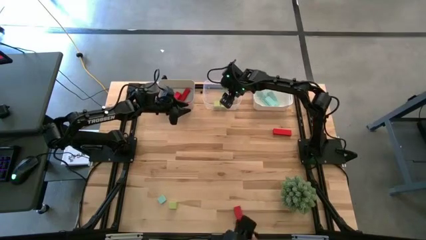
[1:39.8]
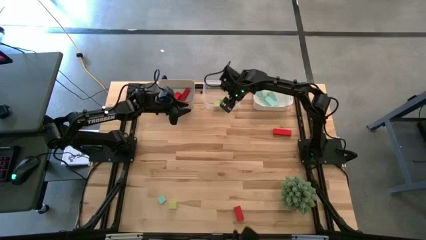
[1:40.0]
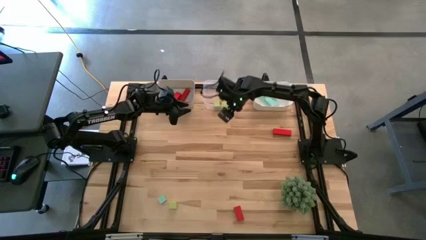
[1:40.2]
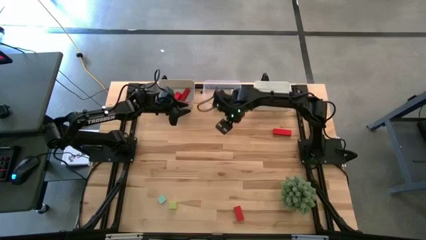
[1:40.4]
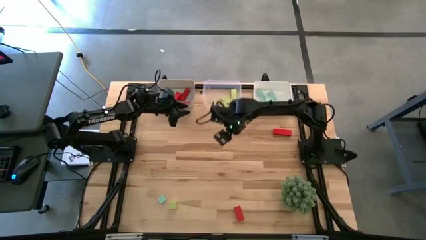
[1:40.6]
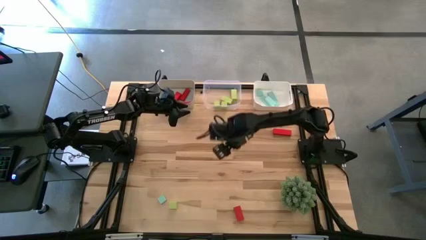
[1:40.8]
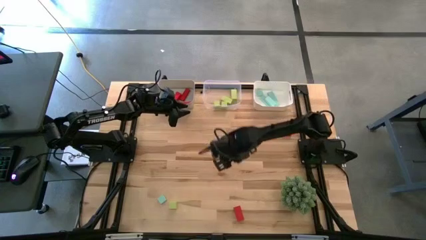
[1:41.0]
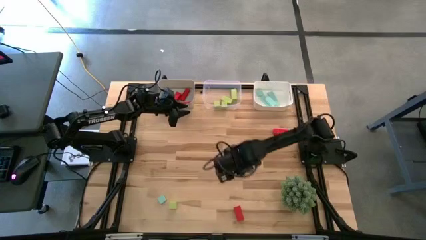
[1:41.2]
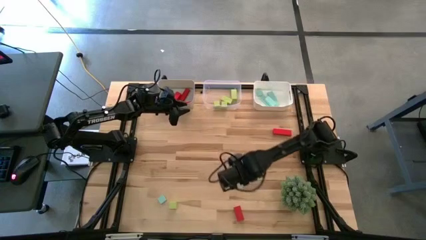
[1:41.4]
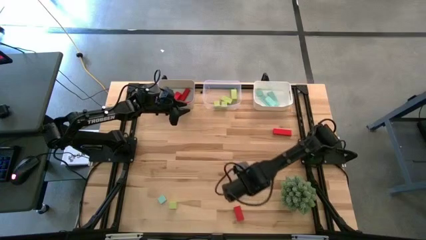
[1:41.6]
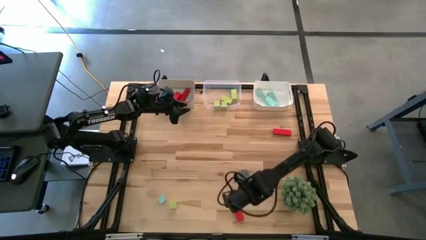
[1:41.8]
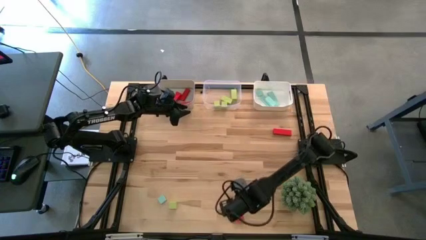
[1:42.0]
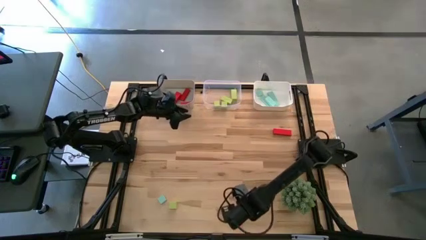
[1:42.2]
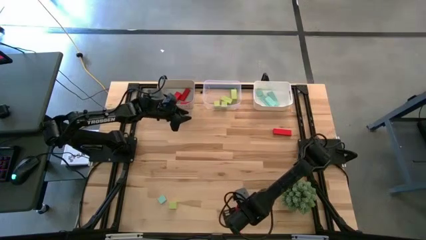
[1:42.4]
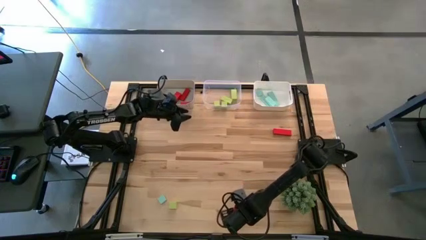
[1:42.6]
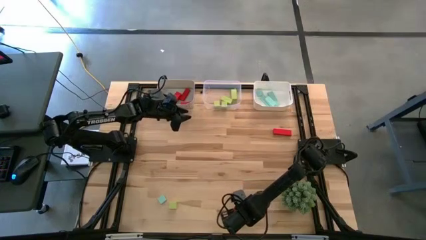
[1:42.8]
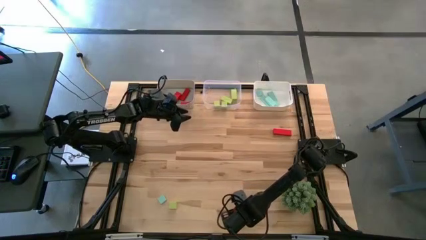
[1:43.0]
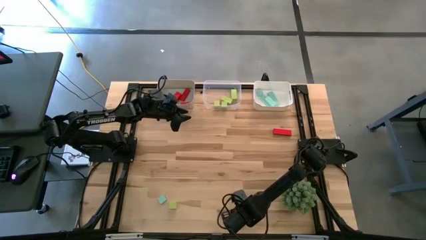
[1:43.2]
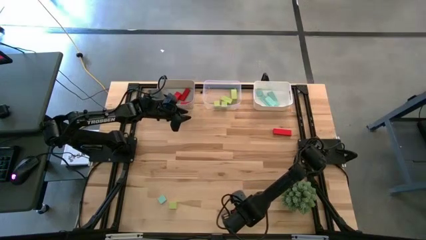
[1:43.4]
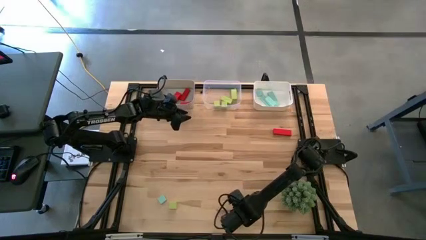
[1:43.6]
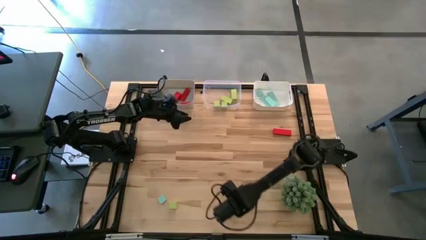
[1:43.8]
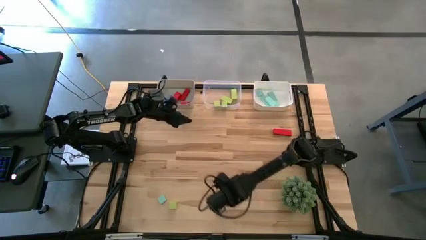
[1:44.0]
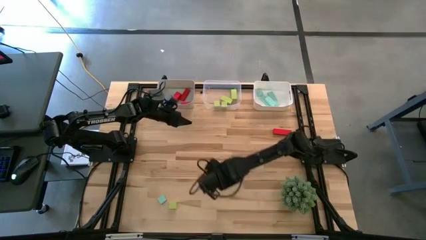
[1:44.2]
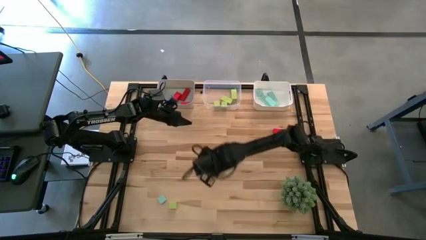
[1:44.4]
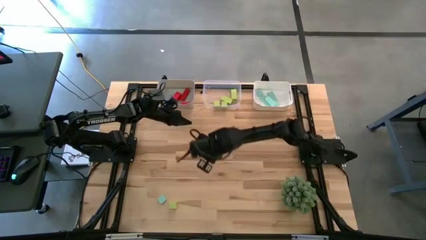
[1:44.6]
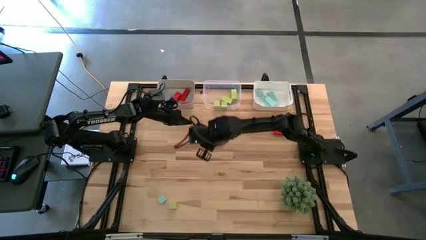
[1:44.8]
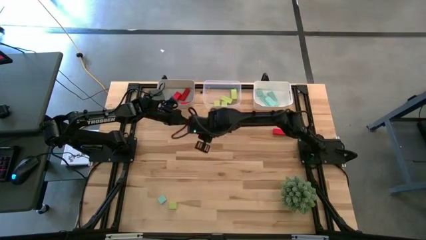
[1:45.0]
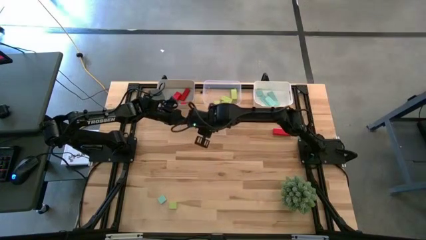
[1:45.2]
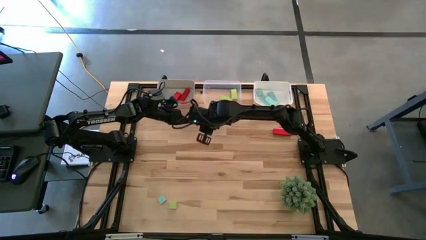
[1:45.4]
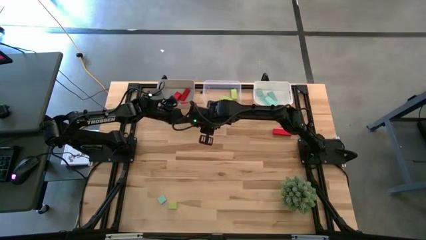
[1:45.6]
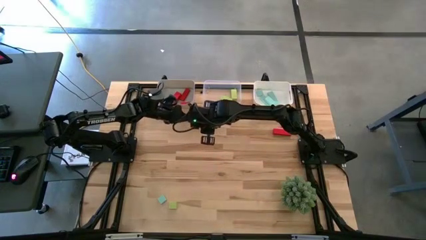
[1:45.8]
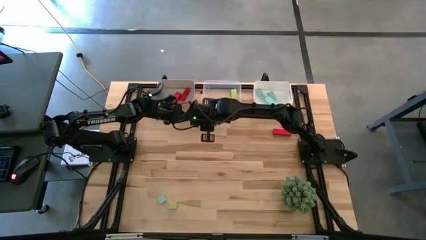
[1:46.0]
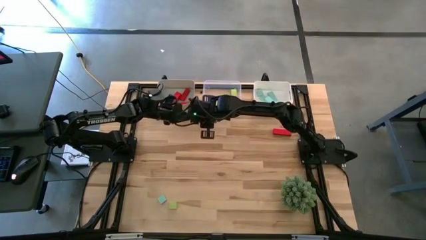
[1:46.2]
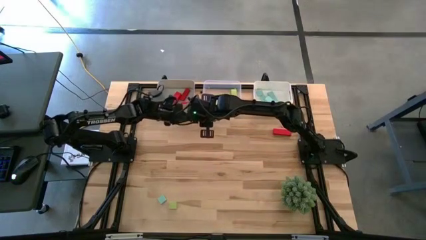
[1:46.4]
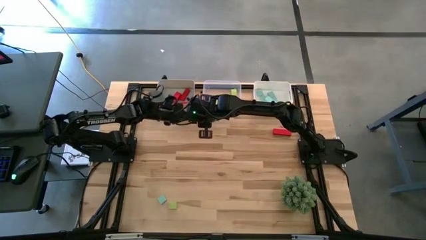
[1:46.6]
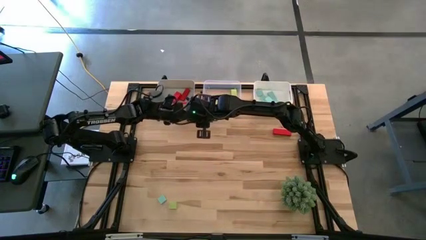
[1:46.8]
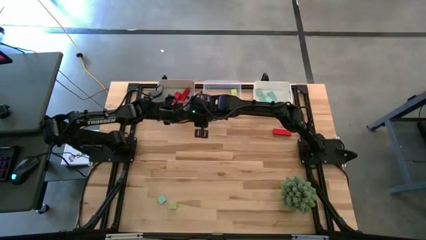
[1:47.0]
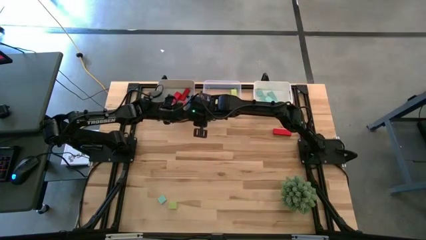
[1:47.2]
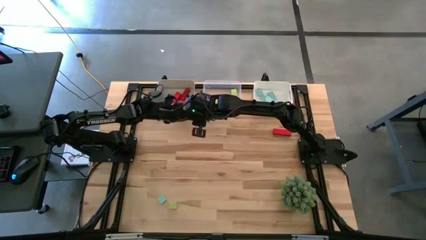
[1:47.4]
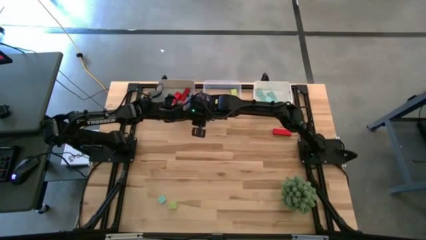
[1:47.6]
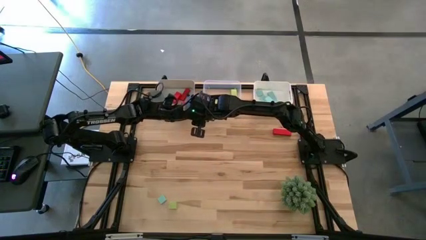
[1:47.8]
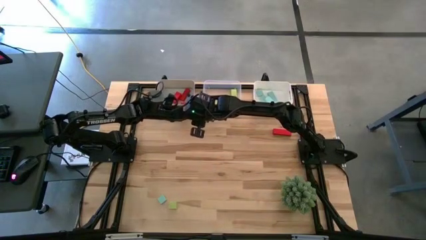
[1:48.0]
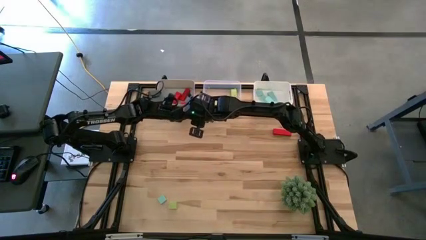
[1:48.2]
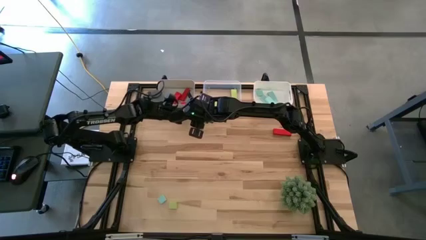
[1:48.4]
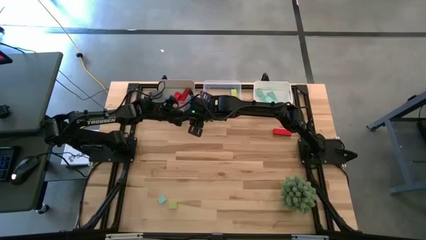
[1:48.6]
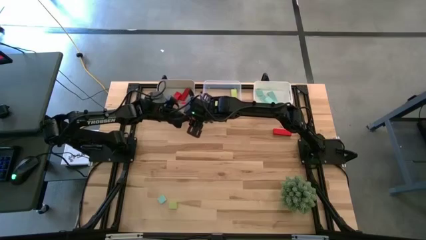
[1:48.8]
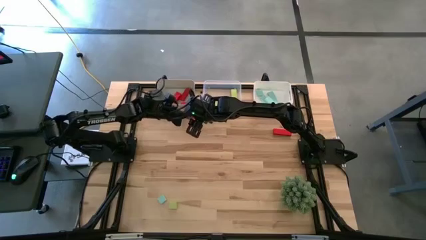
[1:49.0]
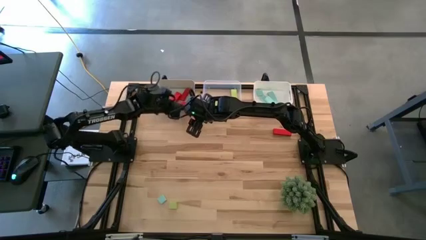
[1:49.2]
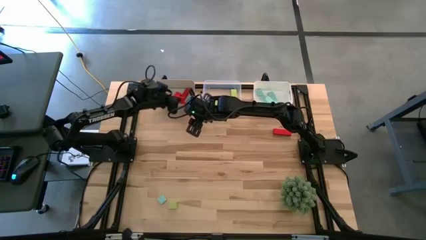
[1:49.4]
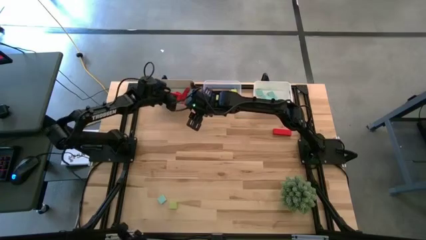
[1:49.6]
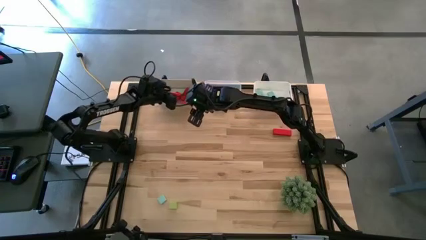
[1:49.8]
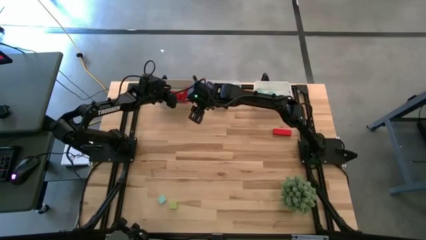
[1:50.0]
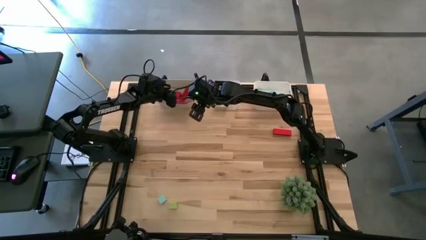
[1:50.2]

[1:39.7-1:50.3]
Task: Sort & place blocks by color
Put the red block into the gray bin

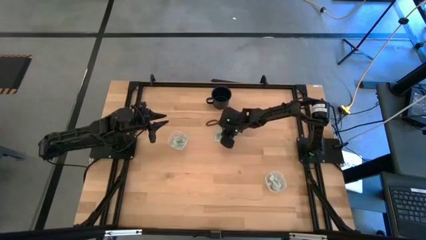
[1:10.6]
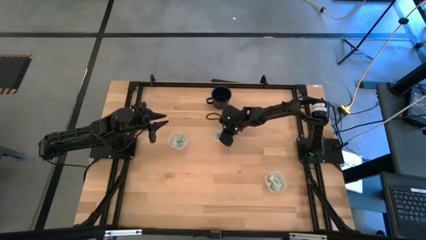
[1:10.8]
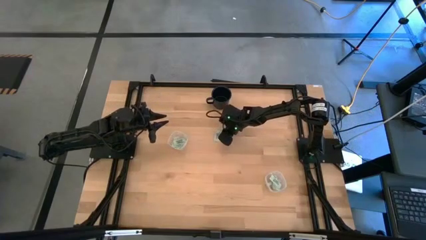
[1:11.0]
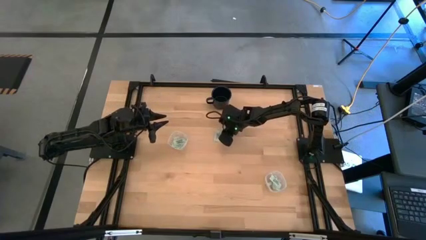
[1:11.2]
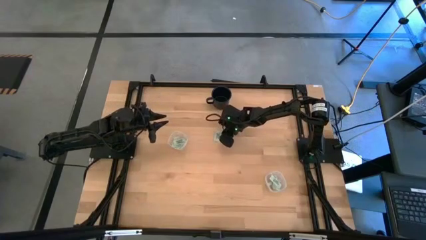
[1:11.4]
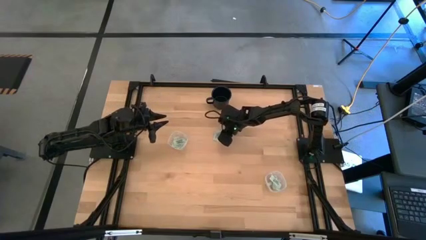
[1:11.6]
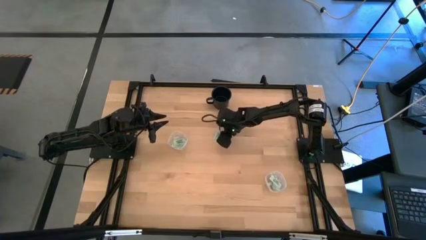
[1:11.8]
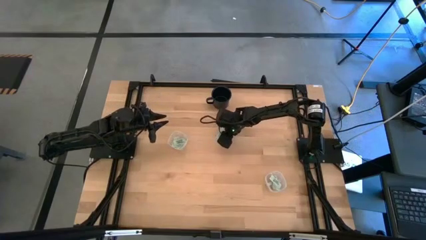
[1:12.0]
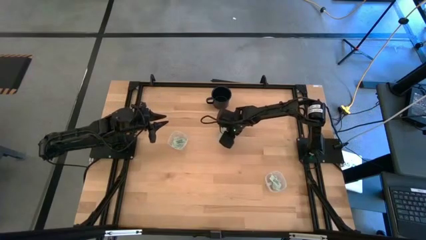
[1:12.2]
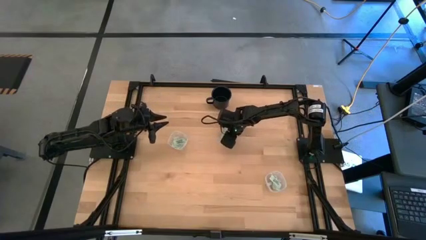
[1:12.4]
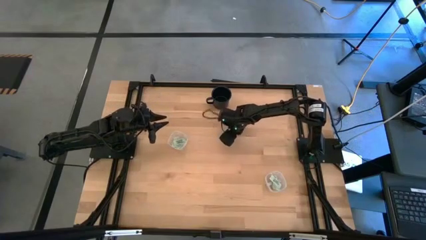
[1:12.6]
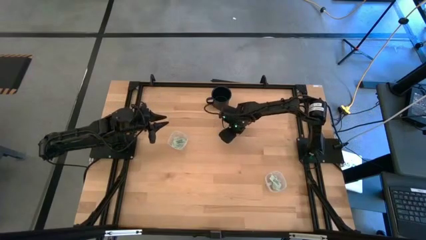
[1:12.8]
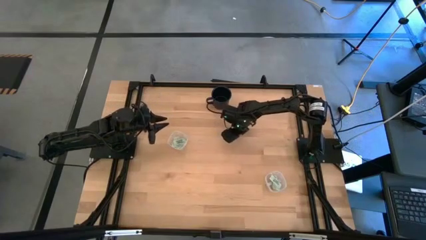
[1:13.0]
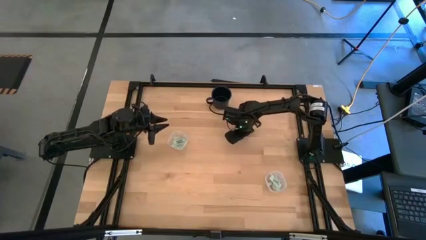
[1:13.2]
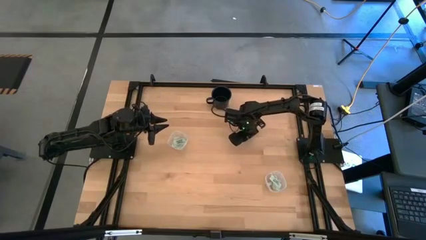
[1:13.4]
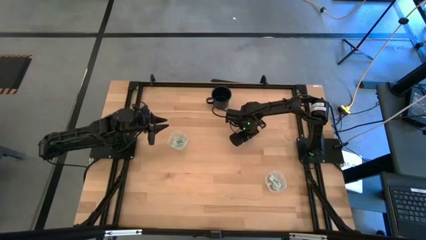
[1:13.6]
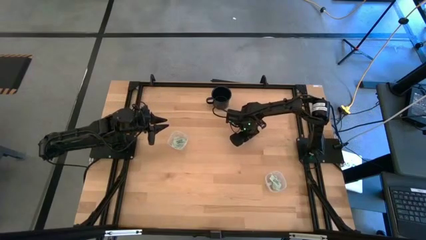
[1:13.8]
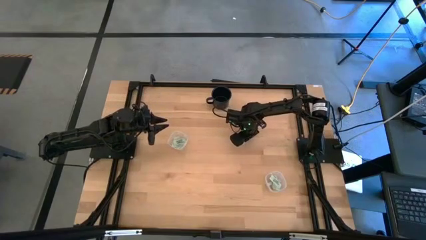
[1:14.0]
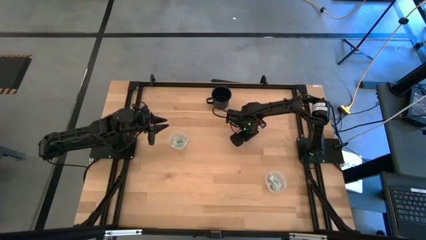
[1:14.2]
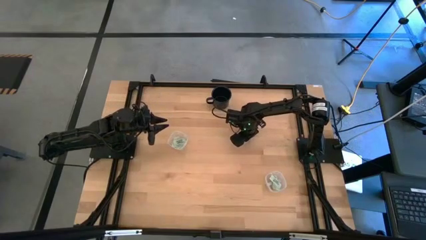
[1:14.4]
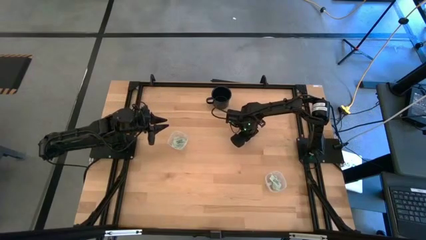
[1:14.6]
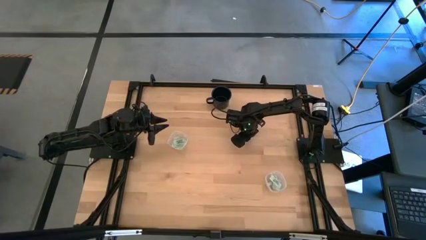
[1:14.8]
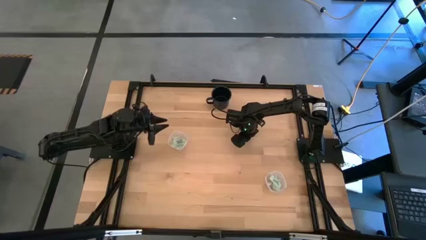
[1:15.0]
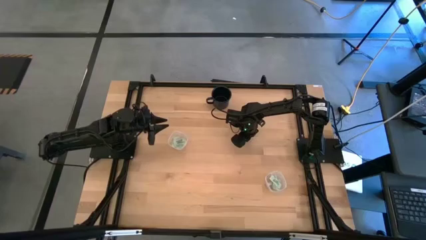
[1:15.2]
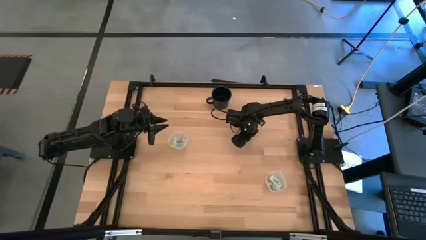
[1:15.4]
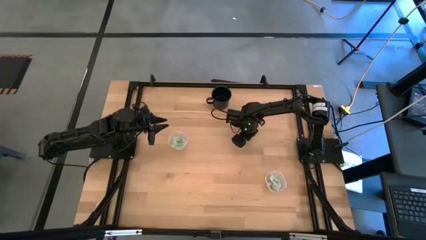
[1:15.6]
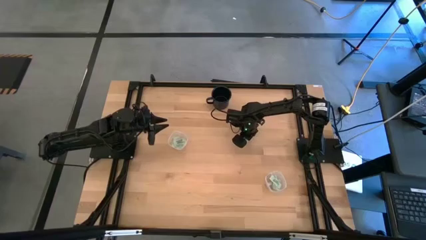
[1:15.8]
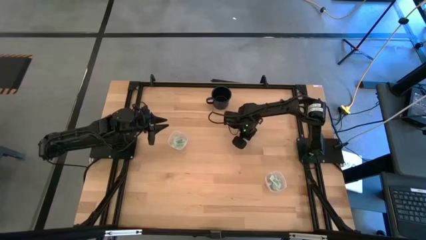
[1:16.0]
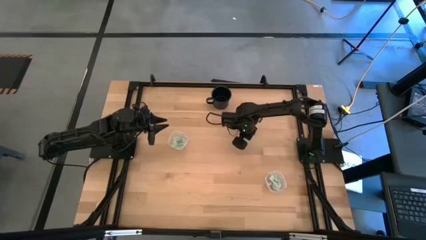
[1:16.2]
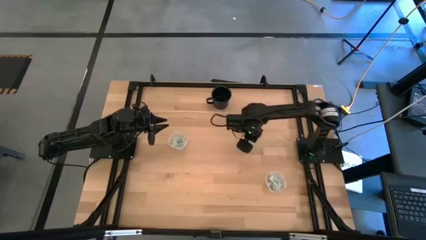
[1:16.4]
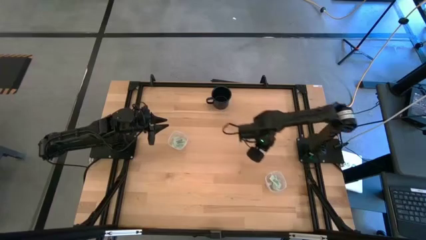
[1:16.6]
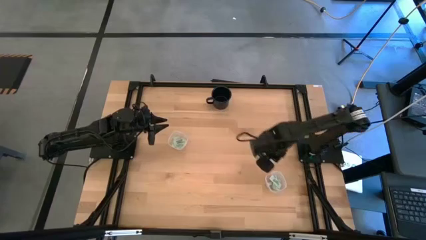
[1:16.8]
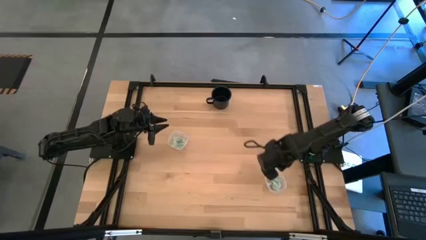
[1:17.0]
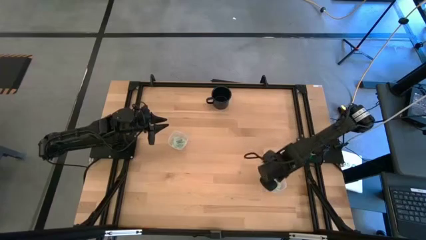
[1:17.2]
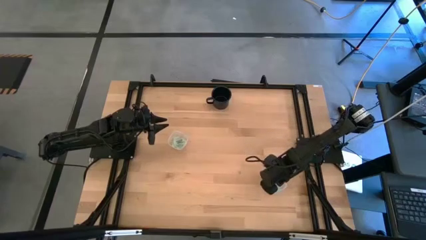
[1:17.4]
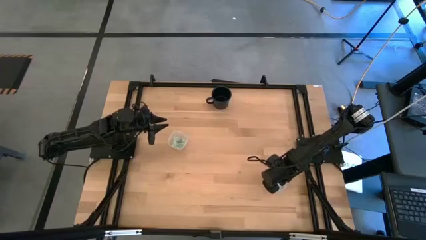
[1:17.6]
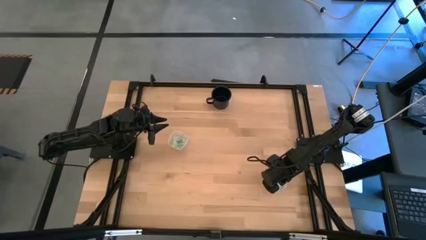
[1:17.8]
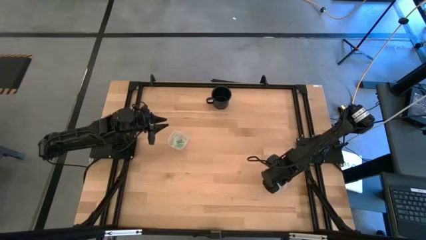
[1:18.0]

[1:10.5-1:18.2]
Task: Pick and place items into bin
Put the white stevia packet into the bottom transparent bin
